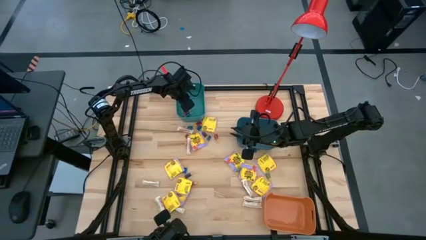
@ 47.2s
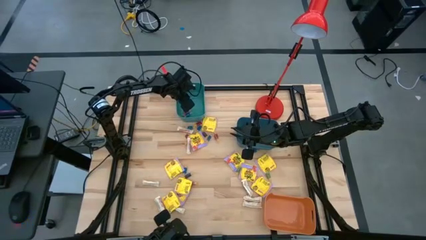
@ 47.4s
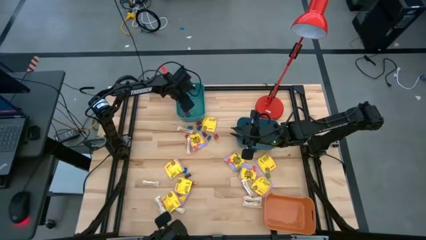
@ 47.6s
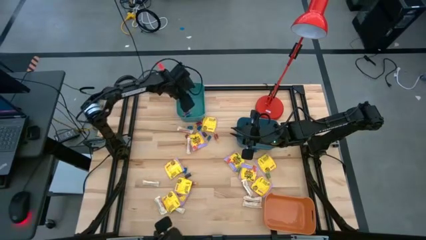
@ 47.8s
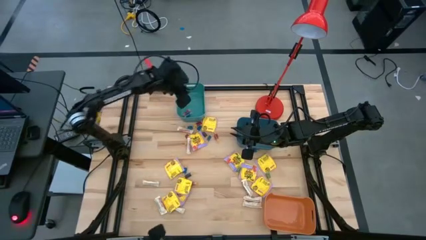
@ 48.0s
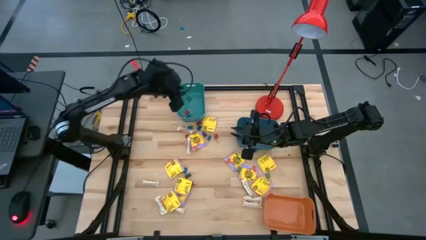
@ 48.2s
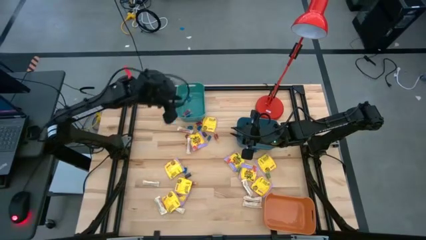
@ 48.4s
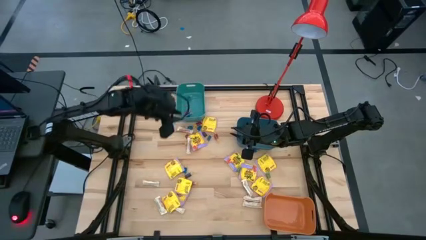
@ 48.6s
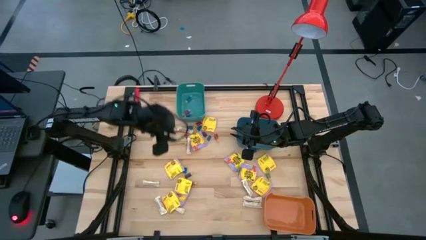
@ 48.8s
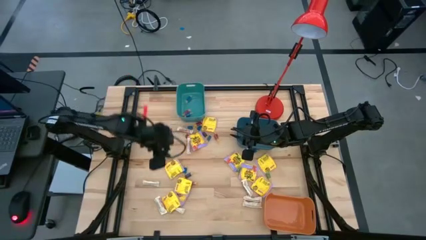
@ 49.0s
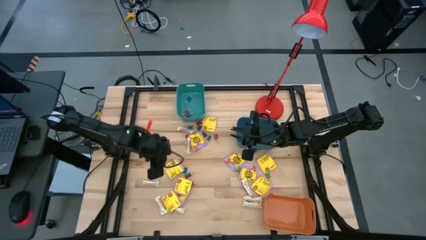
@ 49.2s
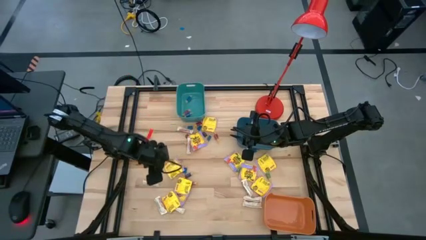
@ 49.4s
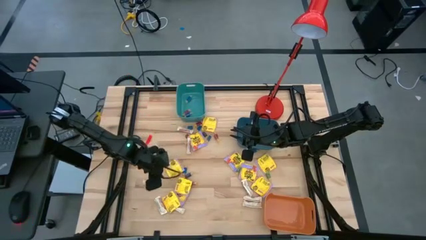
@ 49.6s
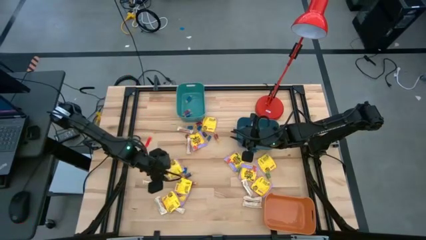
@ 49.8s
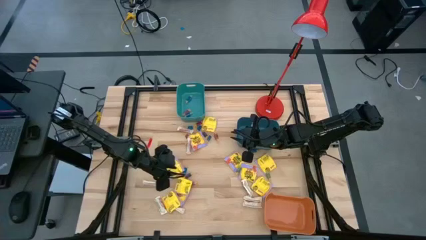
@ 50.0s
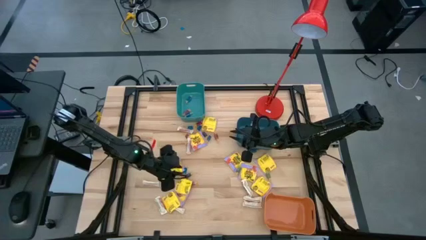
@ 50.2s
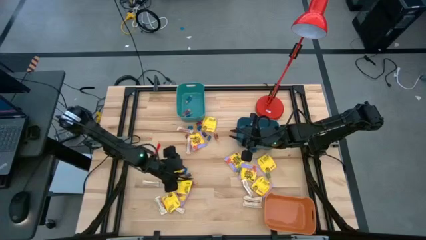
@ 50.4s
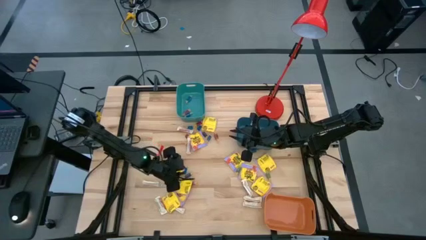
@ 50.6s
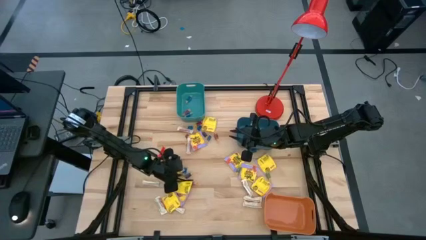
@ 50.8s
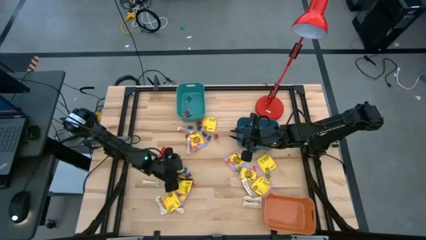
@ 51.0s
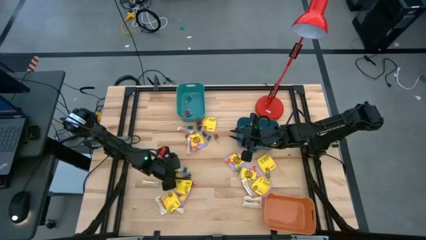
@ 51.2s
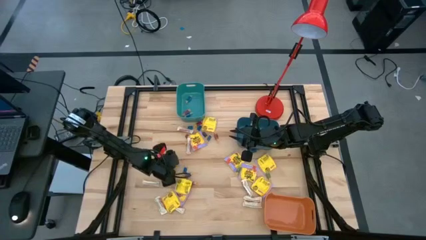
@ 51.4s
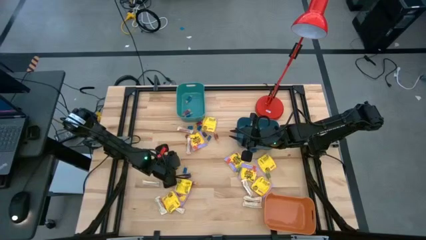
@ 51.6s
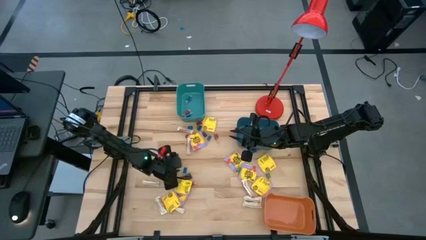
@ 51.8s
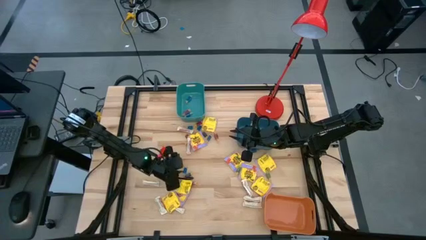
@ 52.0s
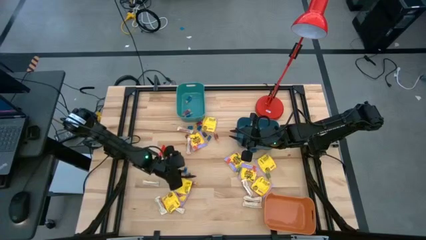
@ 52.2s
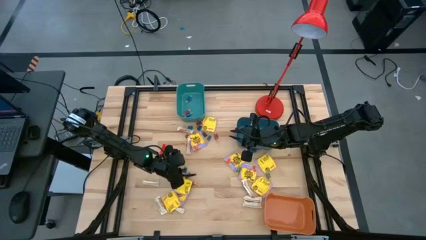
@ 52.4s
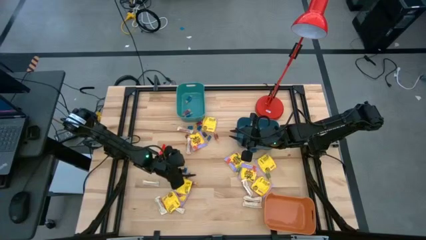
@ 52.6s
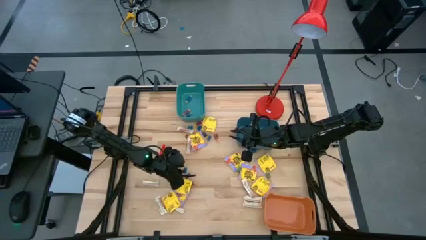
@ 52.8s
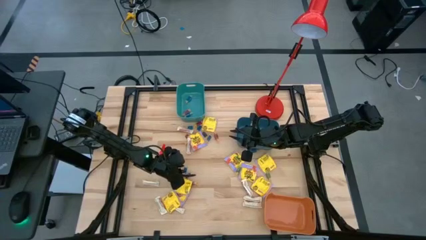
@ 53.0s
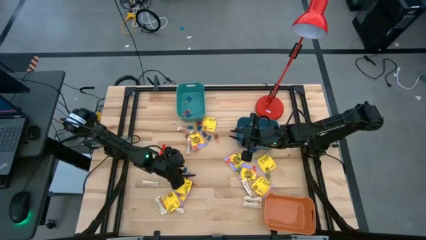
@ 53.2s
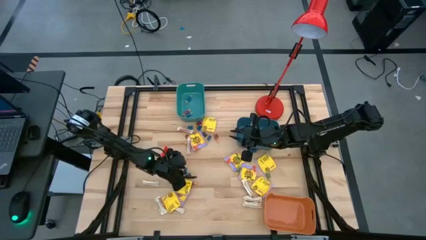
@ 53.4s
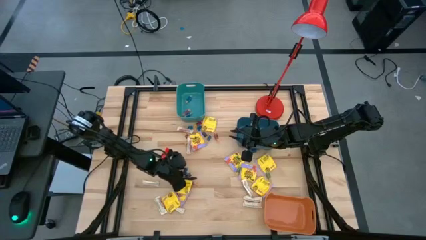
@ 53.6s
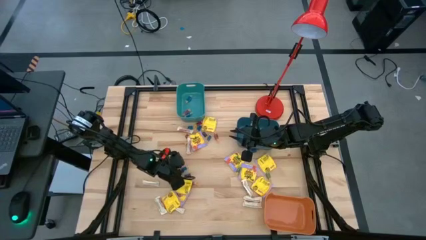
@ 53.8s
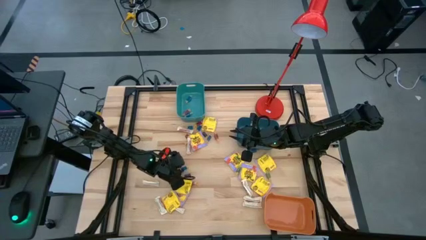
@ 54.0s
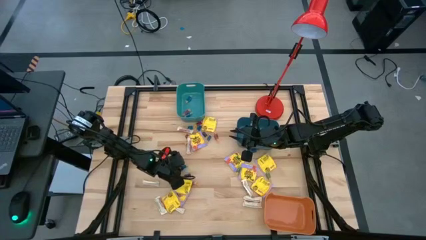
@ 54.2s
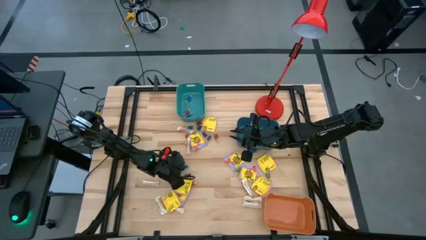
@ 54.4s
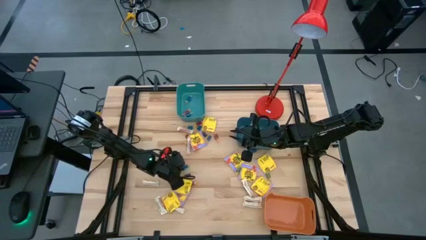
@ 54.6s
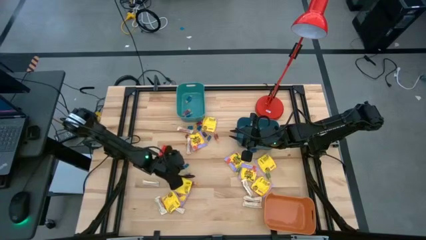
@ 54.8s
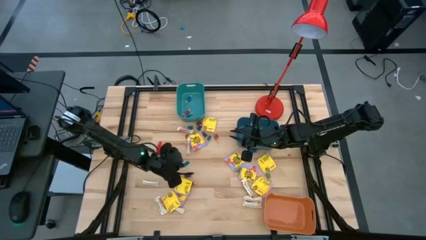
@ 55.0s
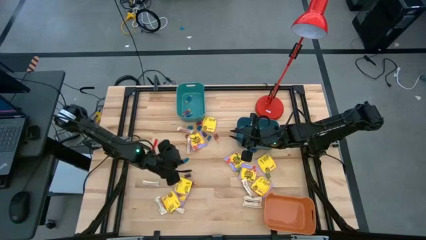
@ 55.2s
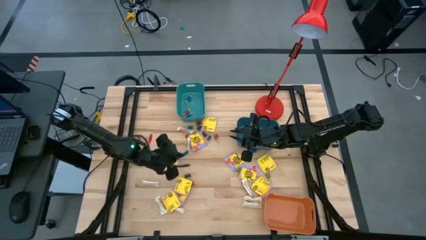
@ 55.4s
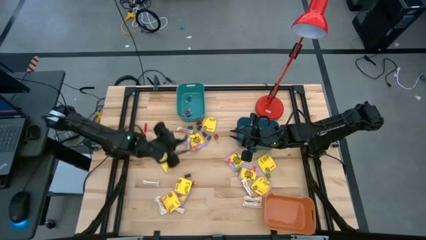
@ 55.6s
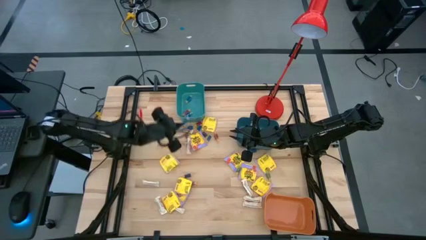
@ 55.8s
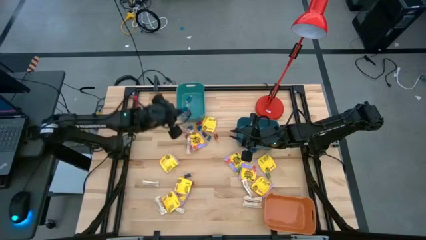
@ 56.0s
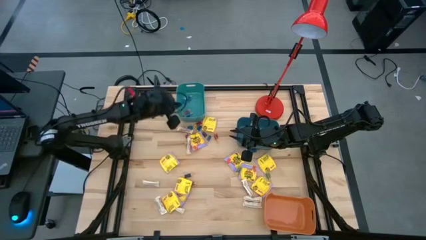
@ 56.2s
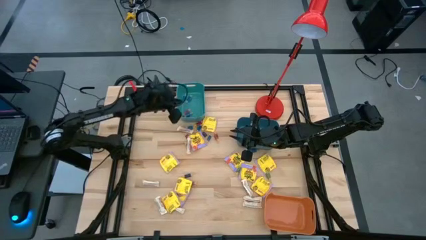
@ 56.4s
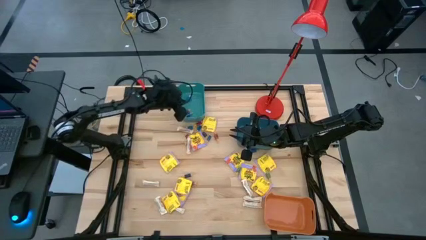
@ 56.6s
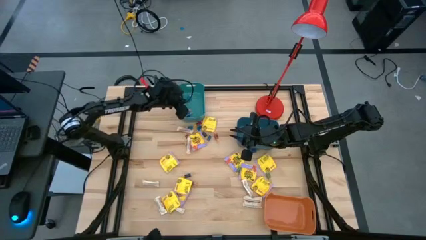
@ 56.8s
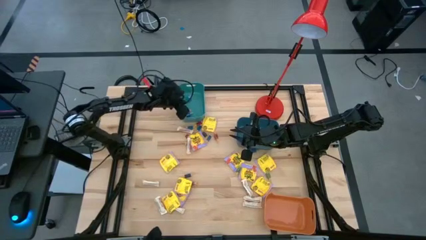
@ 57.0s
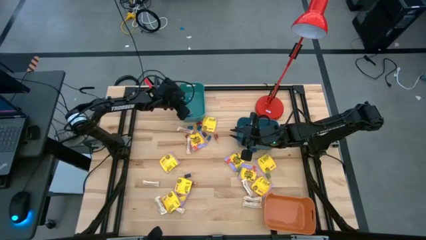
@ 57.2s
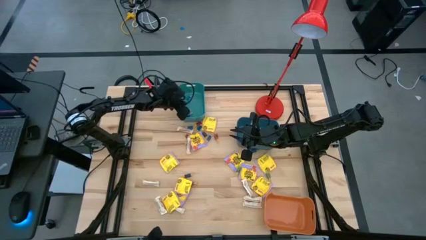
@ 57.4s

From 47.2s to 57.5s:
Task: Sort candy
Put the blue candy into the green bin

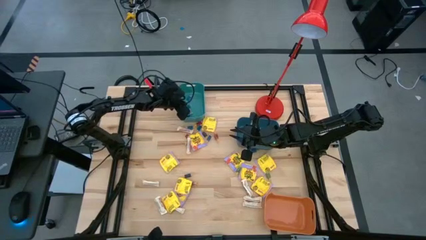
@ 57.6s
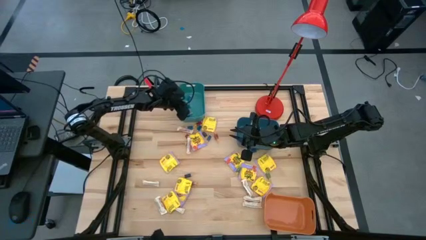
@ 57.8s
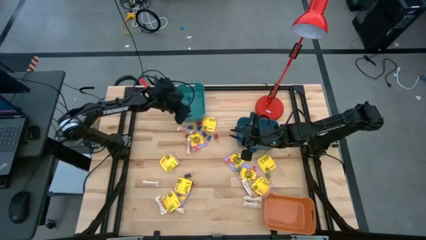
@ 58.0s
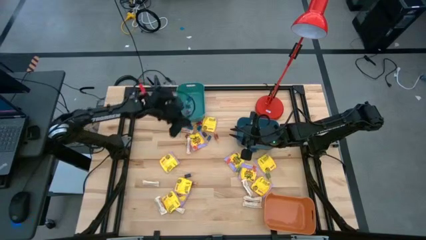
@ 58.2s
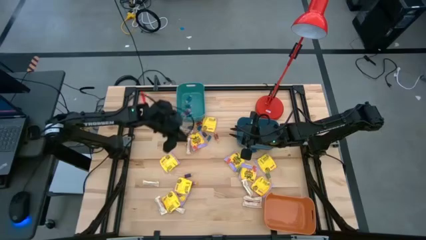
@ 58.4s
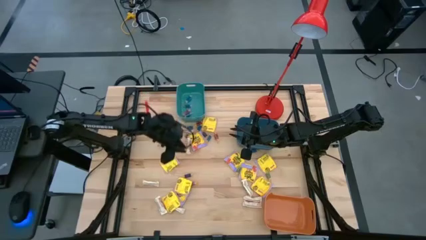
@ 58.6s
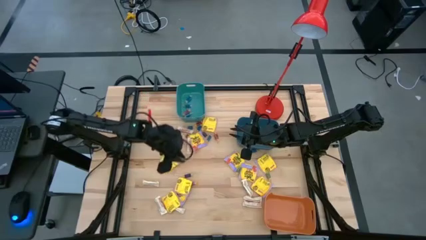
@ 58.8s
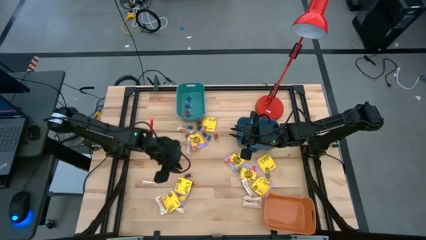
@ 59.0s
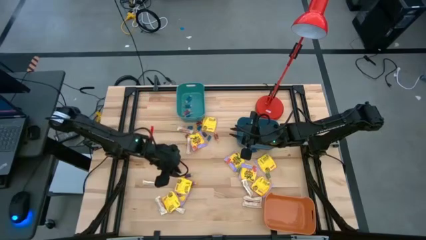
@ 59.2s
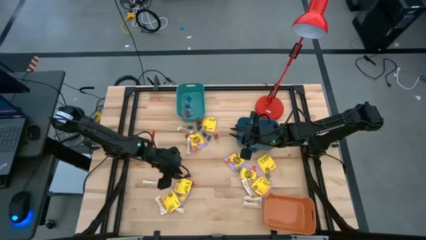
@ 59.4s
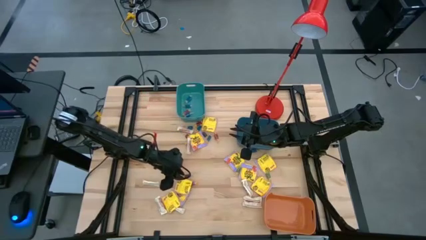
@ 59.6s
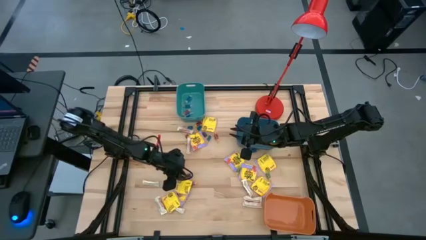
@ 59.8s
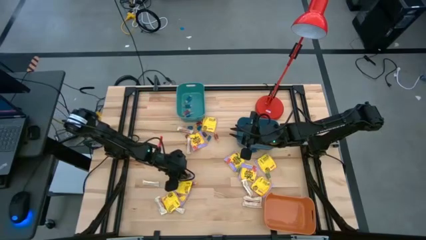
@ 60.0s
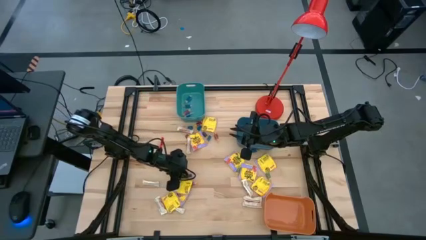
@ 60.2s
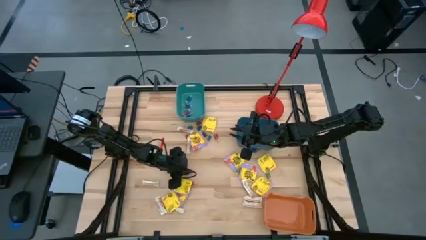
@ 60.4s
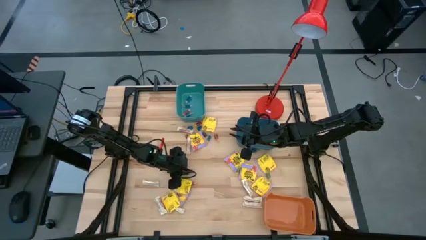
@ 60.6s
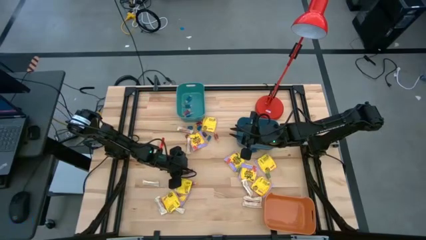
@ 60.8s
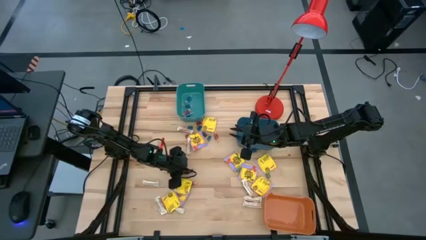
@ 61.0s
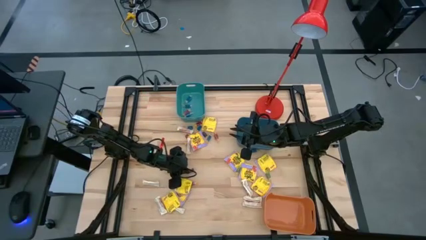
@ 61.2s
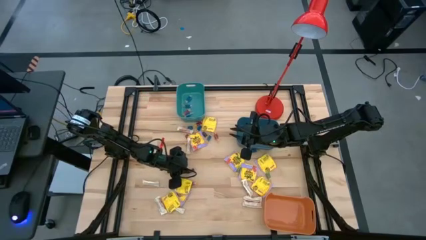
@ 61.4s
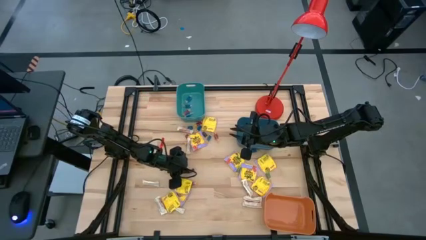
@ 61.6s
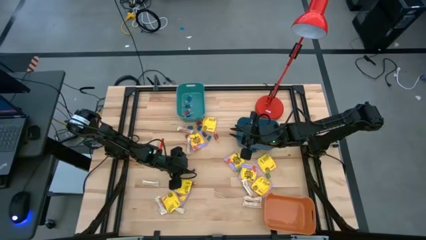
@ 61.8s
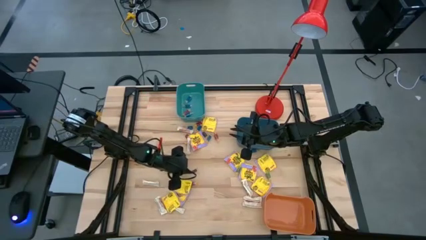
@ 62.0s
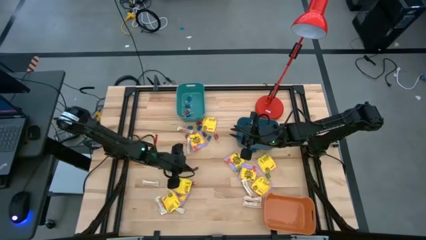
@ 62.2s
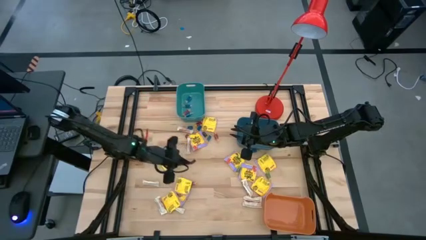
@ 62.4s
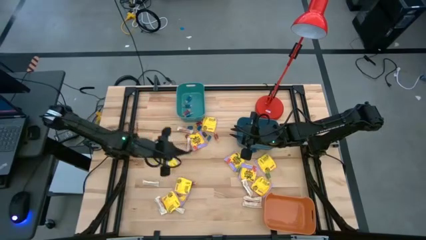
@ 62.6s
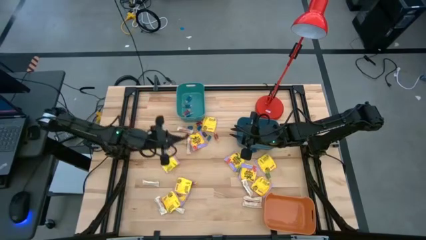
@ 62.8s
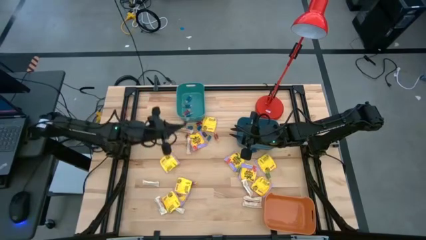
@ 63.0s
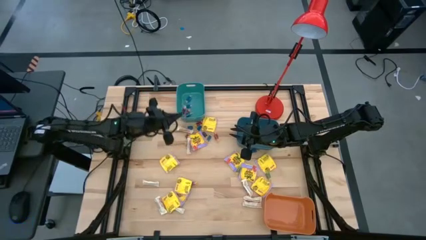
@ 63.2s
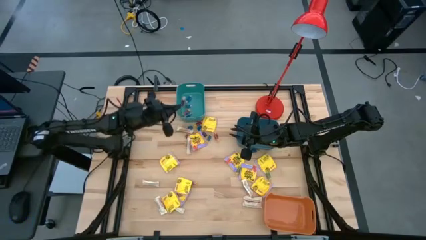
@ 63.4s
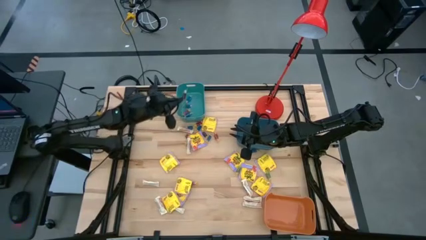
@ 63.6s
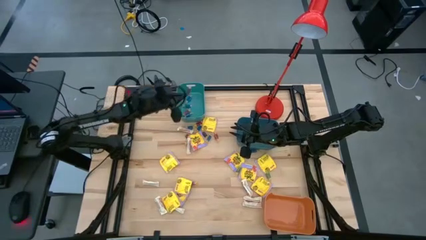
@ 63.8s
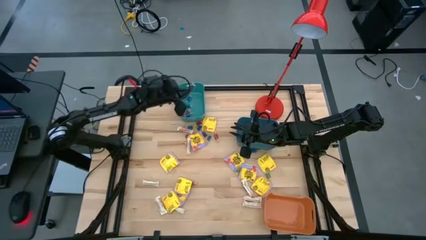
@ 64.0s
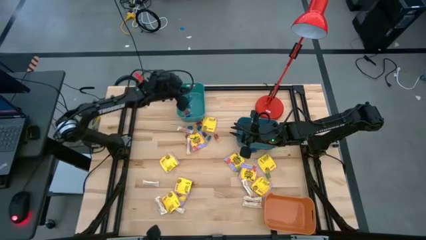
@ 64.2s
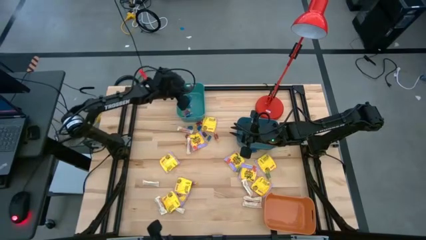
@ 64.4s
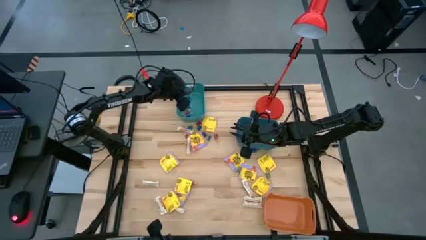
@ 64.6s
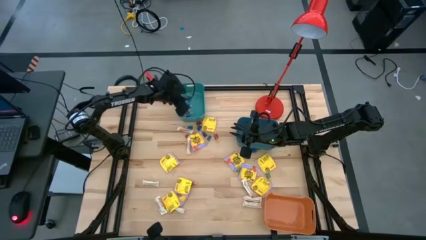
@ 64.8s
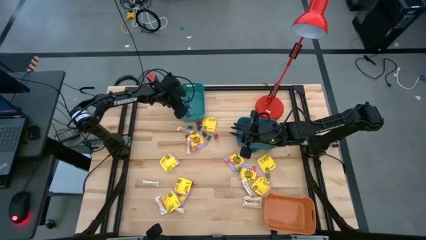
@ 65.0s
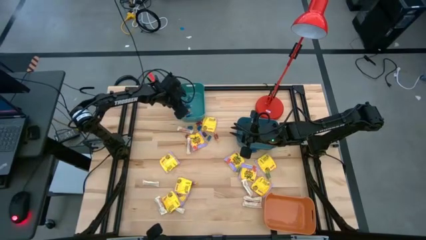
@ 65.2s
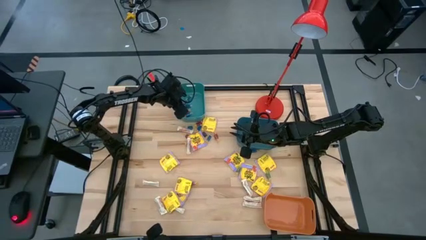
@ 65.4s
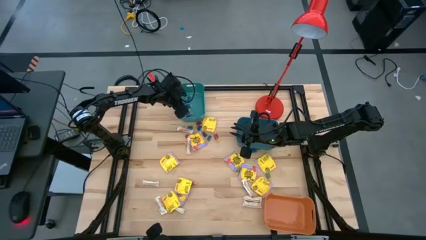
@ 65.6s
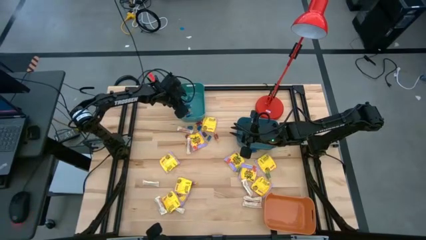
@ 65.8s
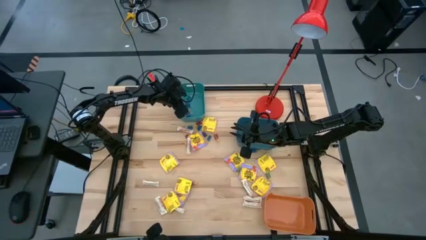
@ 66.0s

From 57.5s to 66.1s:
Put the violet candy into the green bin
